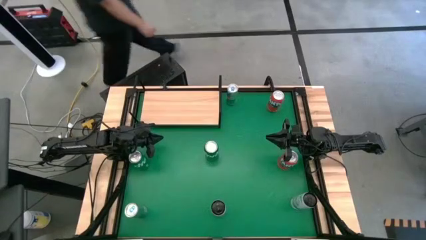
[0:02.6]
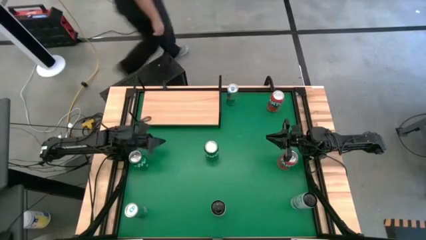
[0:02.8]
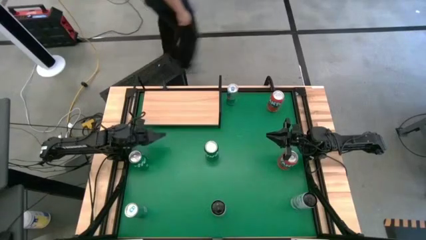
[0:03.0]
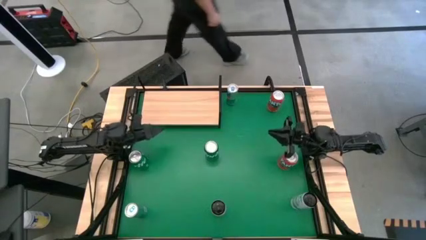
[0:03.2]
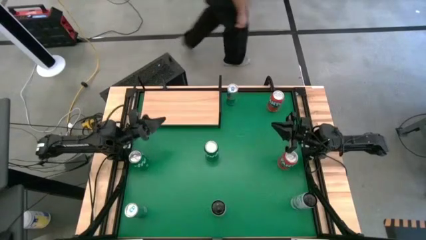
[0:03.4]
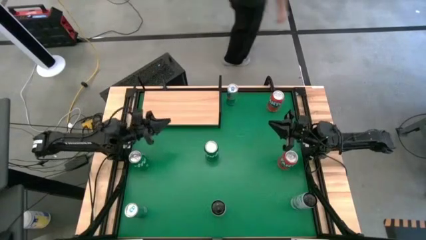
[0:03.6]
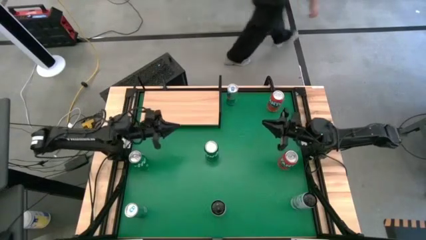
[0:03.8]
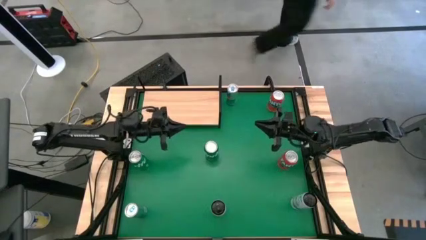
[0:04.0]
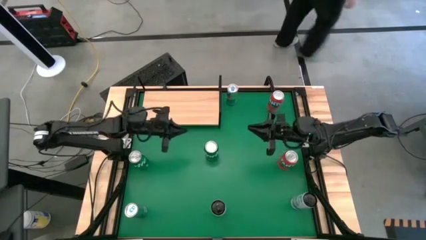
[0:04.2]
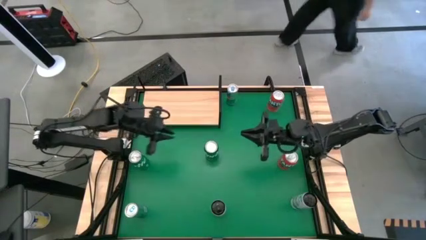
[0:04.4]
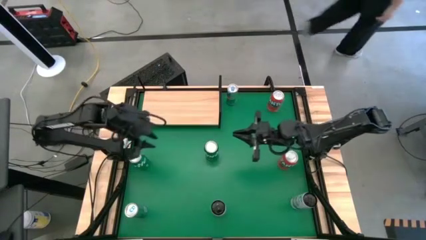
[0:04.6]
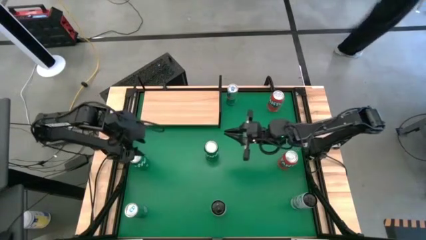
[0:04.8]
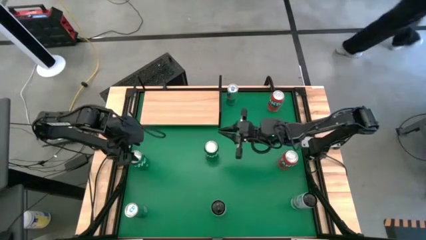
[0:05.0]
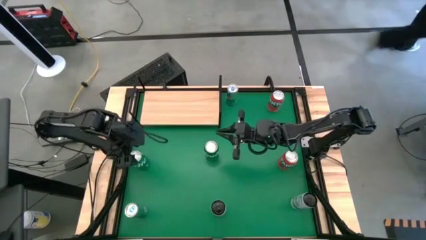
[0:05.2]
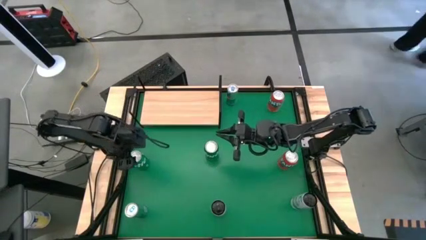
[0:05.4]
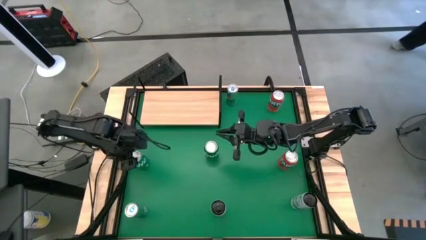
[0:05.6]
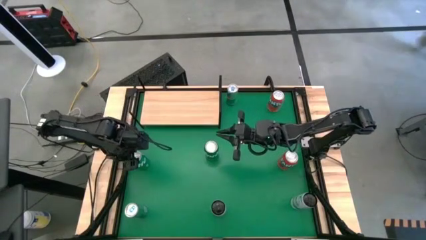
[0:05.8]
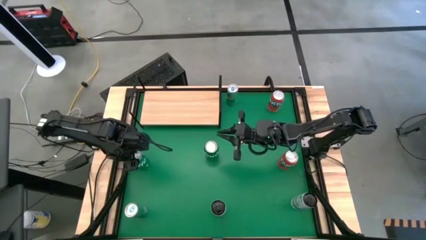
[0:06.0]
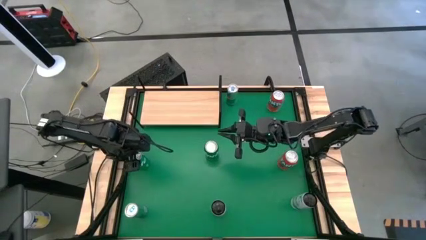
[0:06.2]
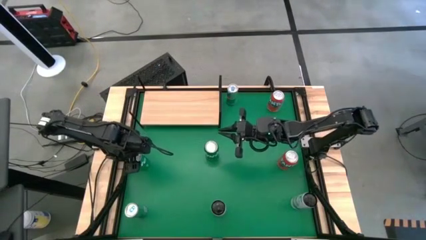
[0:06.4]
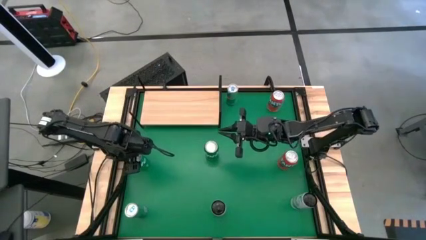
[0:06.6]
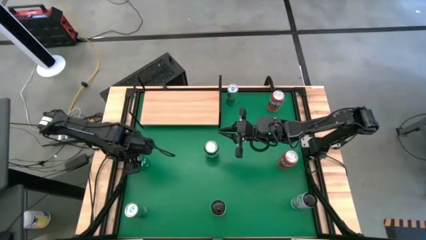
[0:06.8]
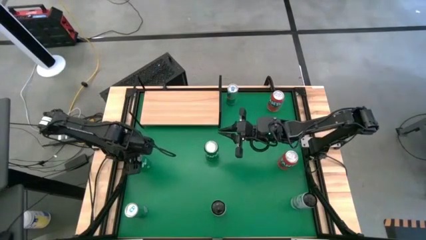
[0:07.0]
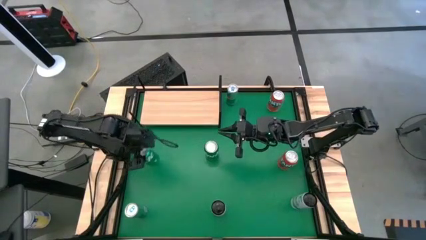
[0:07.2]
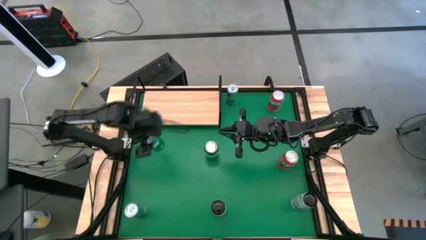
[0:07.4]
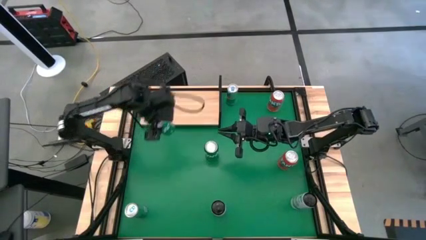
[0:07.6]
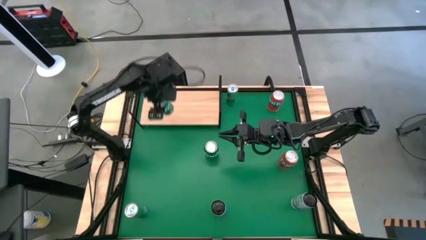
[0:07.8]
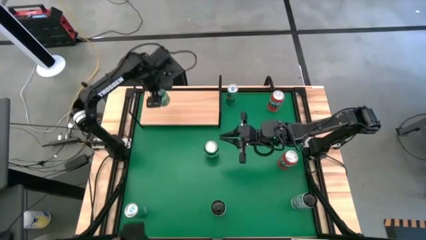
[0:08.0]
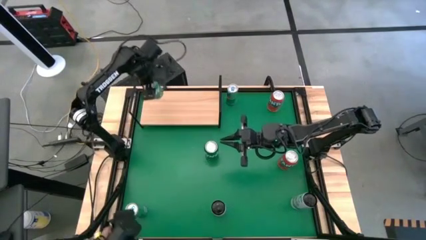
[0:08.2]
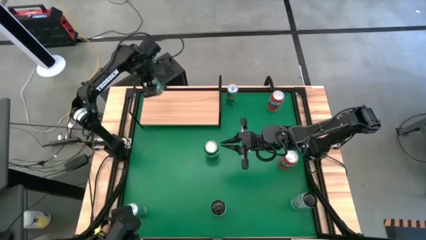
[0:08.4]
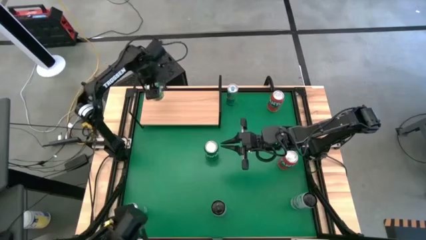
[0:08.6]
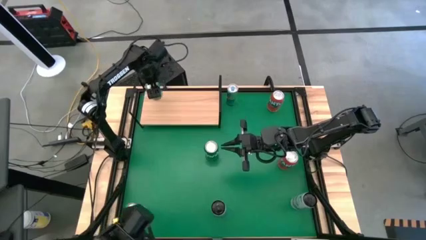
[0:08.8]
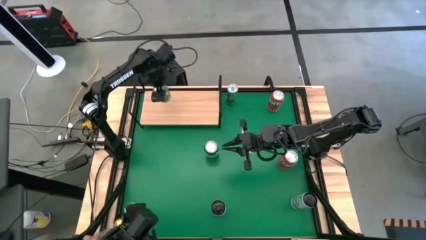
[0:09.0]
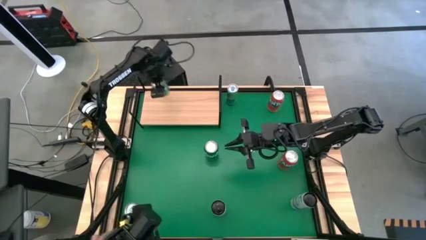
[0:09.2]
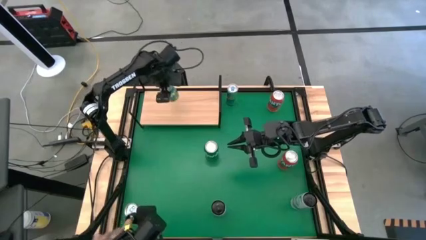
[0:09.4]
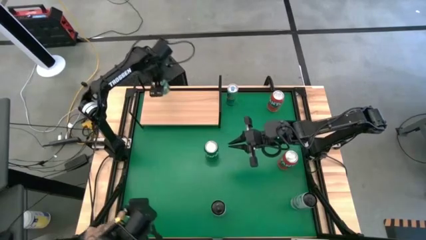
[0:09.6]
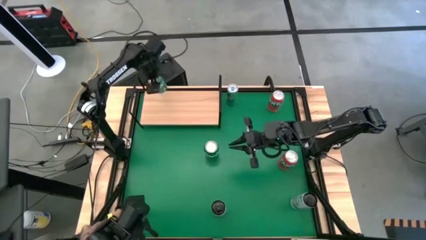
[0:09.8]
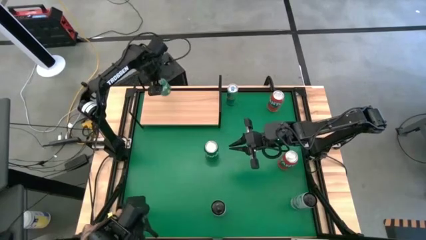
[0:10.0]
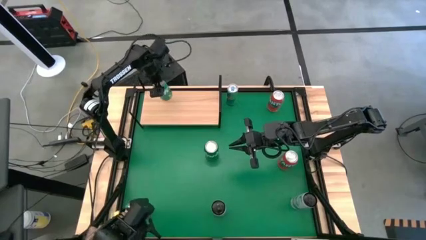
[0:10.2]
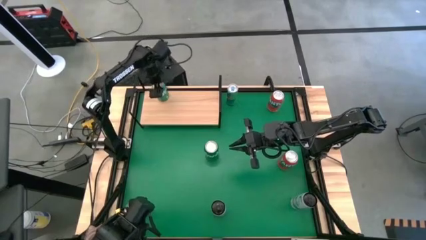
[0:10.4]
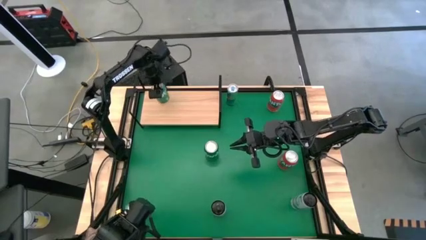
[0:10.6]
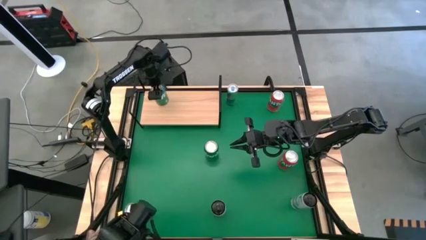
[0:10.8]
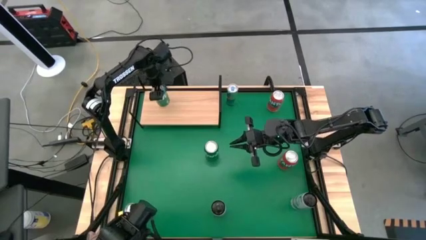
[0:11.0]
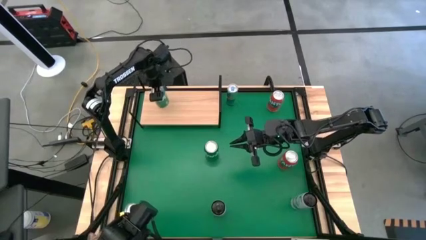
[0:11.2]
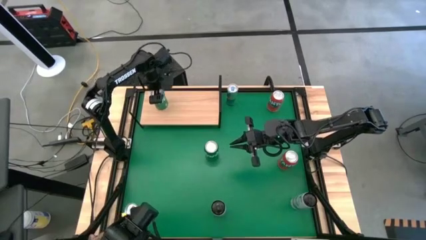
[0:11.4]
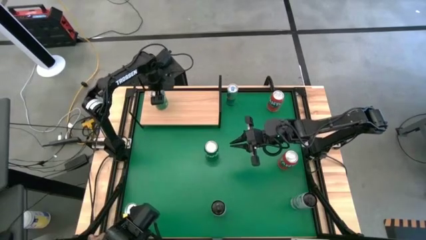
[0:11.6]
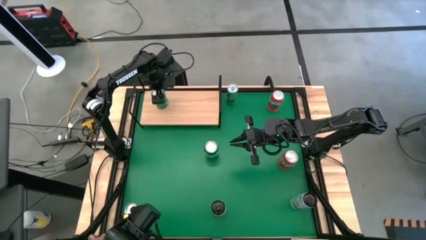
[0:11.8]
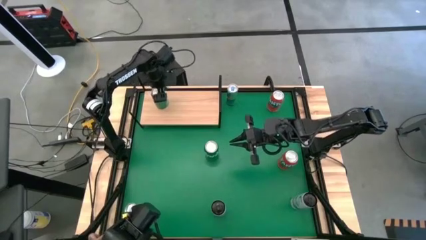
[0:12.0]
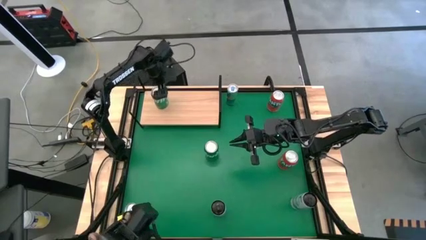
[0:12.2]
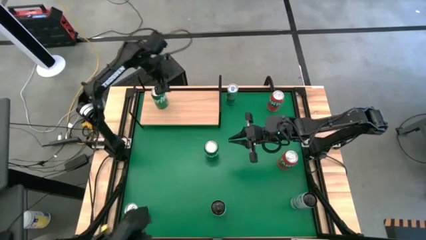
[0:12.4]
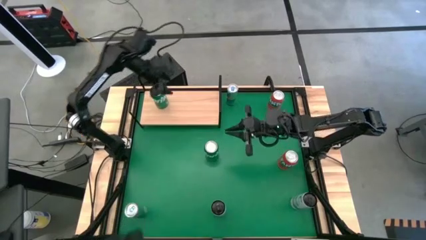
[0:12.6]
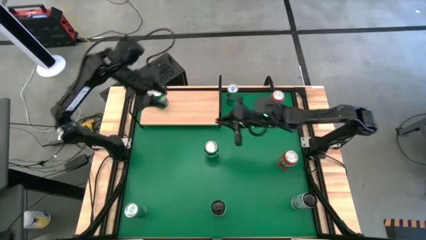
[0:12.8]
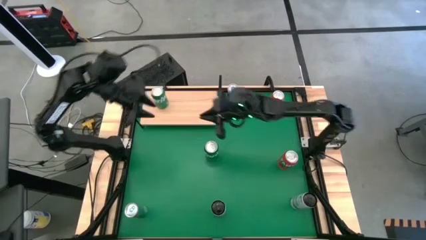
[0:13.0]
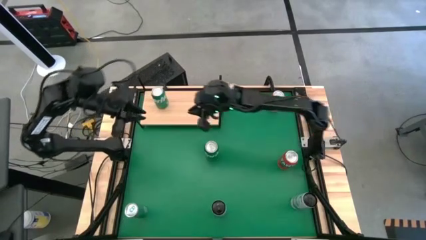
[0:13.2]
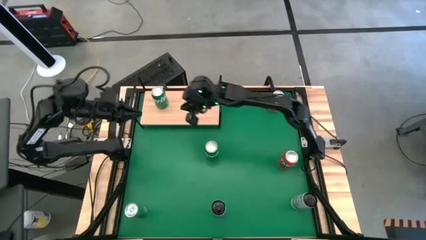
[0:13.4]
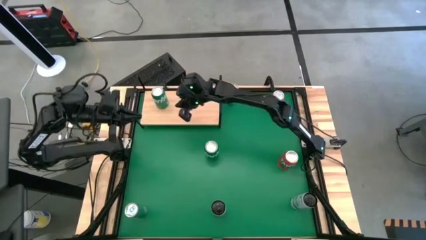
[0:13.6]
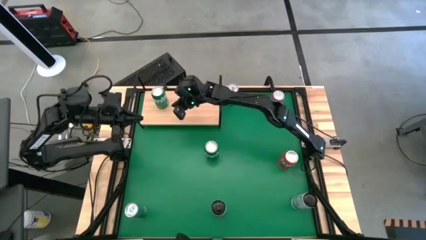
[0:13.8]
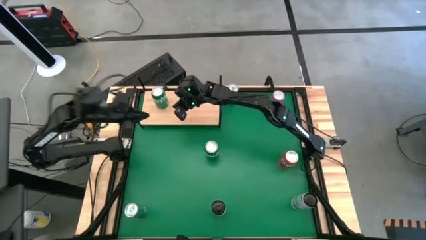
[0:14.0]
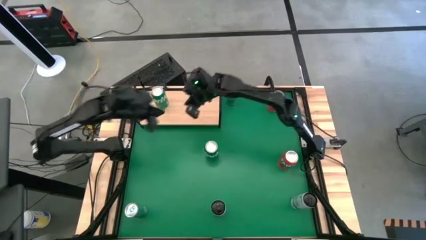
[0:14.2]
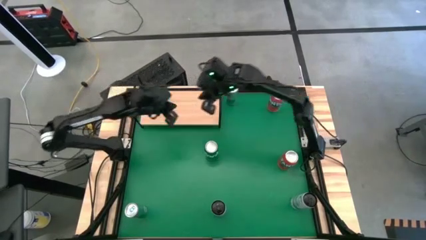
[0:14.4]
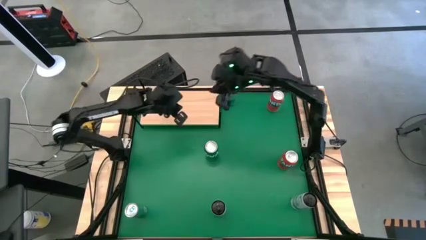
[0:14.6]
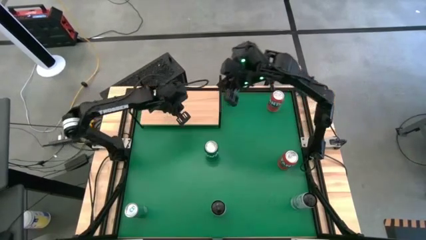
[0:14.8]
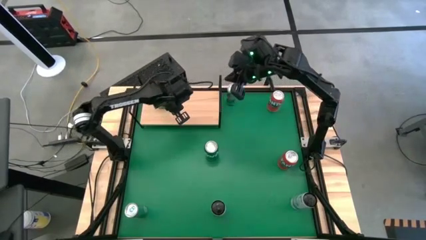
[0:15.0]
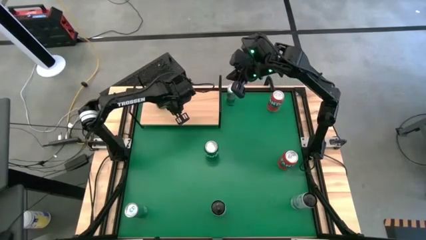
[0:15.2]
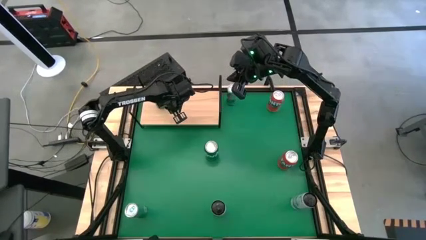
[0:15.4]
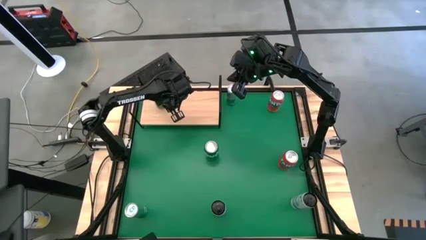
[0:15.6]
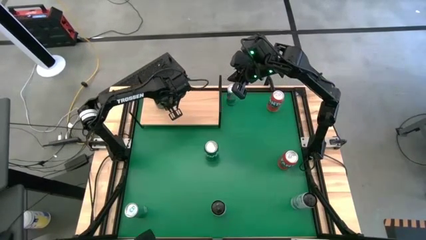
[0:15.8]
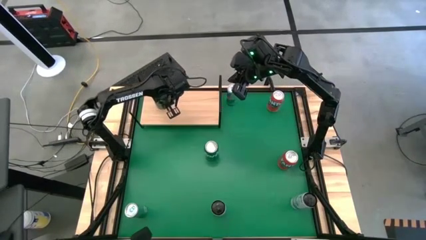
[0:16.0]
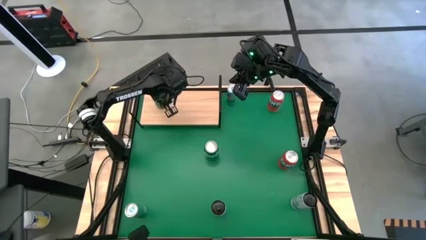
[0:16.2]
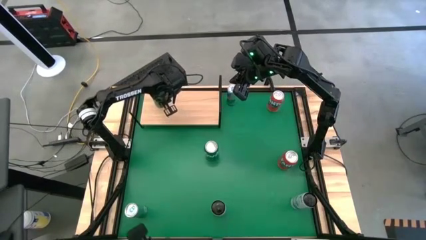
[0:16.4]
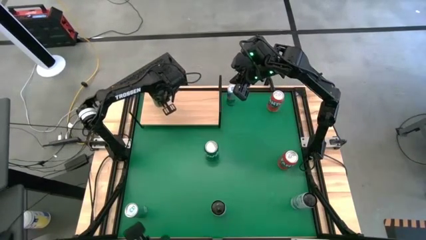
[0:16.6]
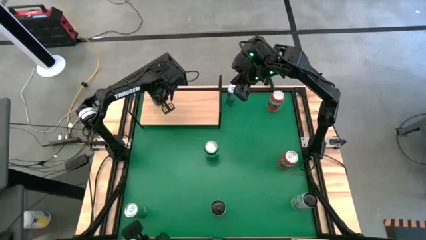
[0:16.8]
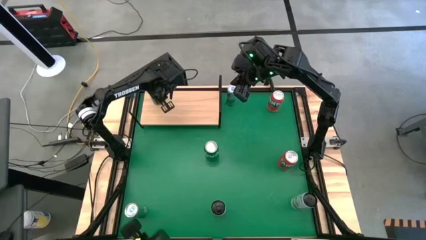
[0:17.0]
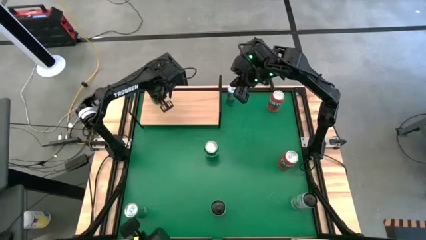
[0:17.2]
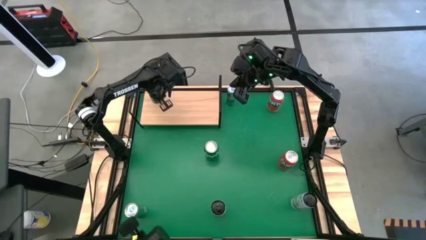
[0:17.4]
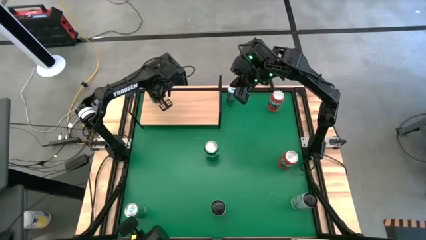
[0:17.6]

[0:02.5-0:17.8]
Task: Place canned beverage on shelf
Put the left green soda can on the shelf
